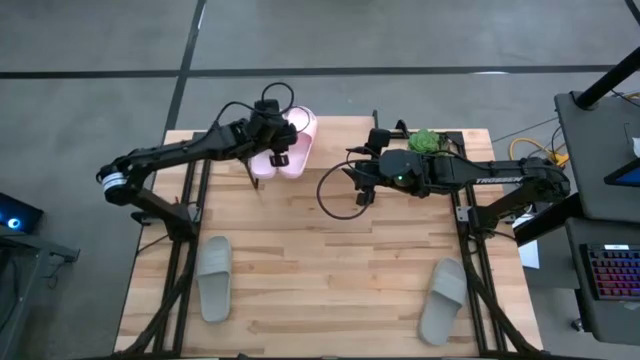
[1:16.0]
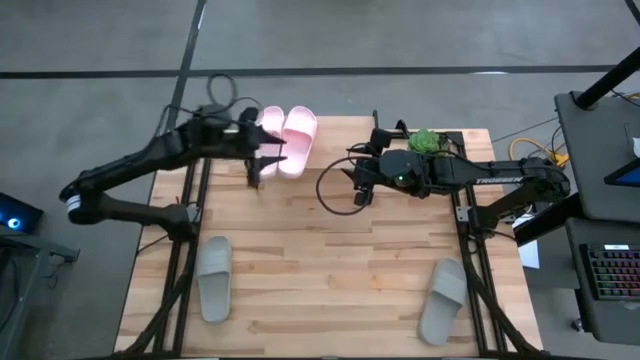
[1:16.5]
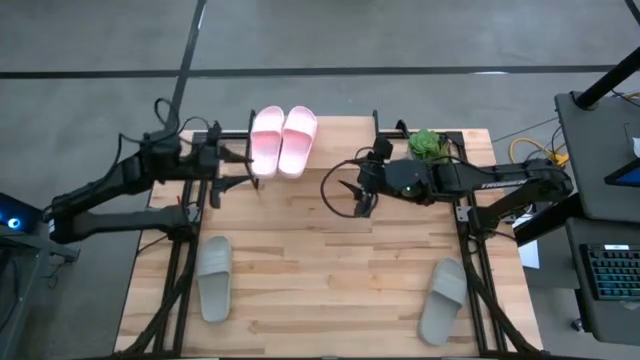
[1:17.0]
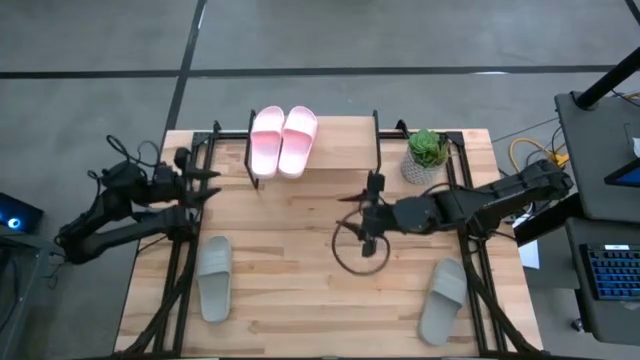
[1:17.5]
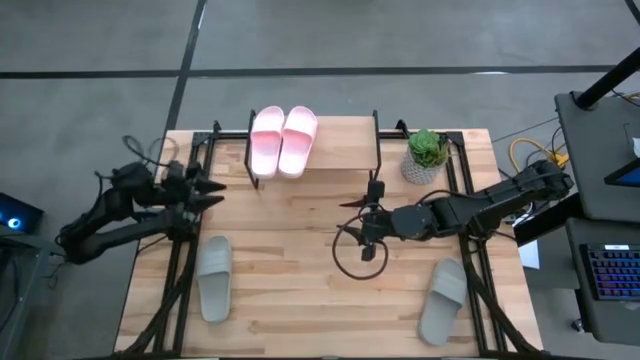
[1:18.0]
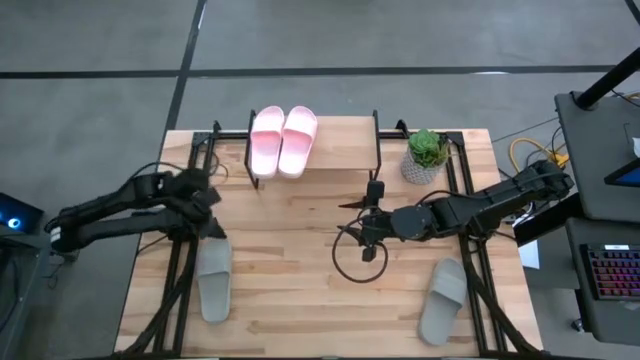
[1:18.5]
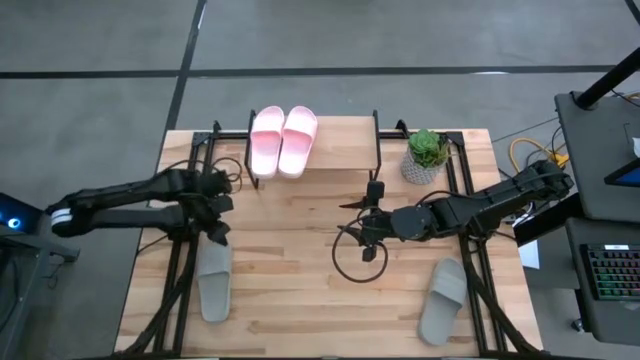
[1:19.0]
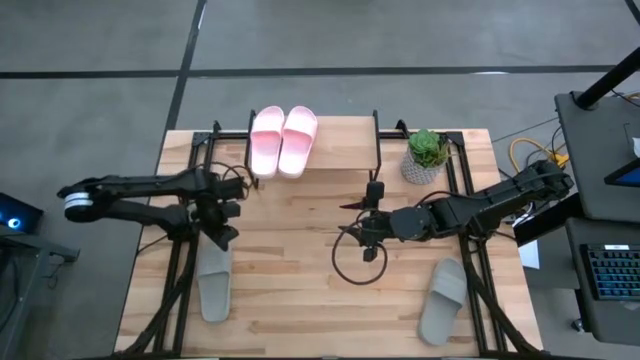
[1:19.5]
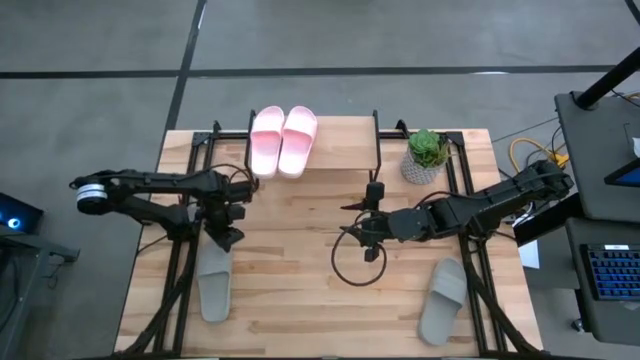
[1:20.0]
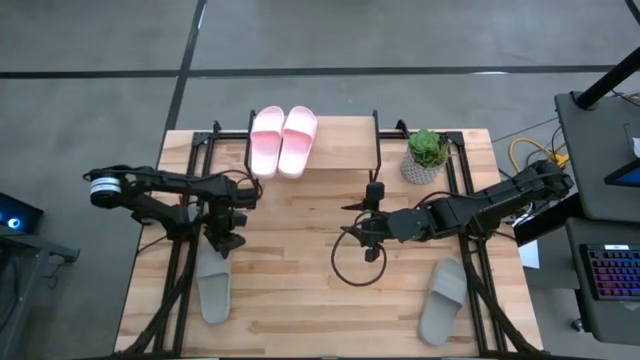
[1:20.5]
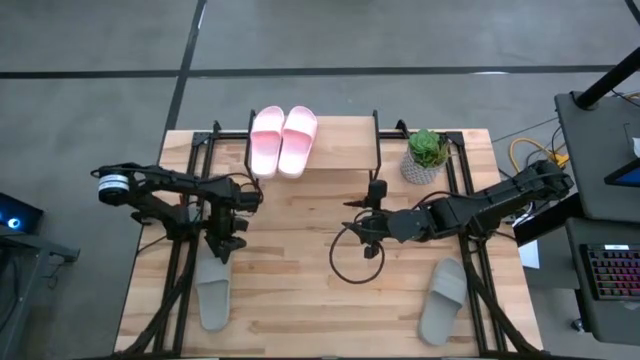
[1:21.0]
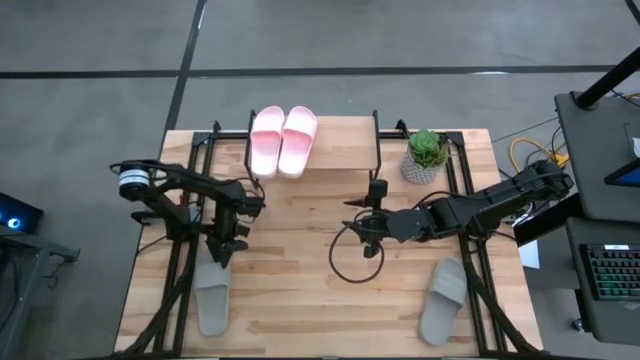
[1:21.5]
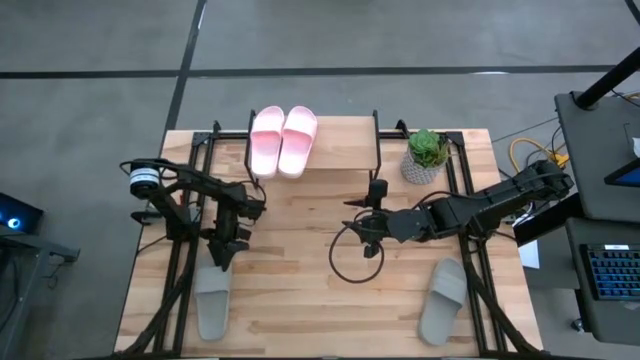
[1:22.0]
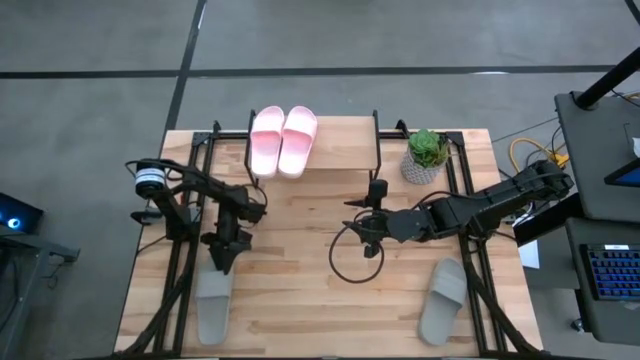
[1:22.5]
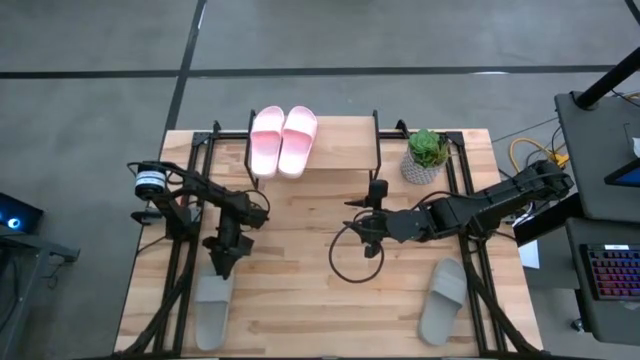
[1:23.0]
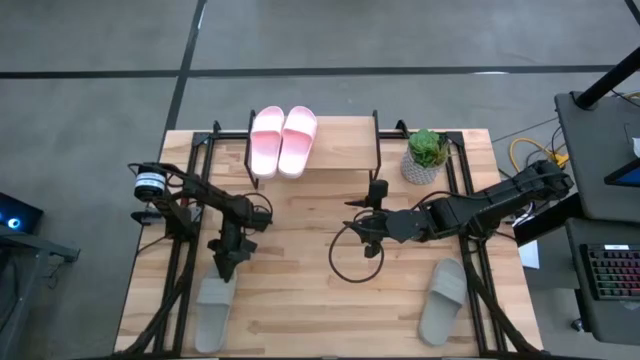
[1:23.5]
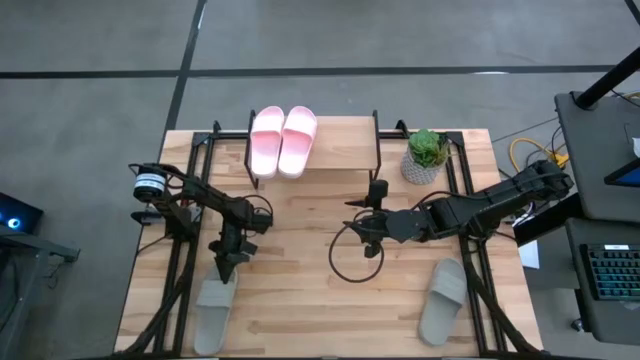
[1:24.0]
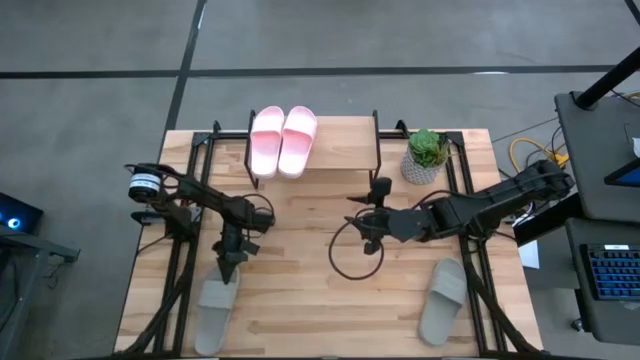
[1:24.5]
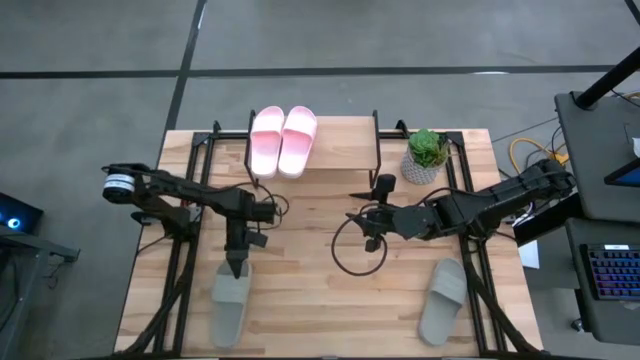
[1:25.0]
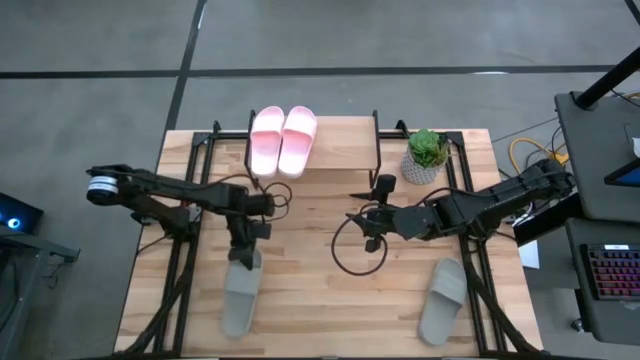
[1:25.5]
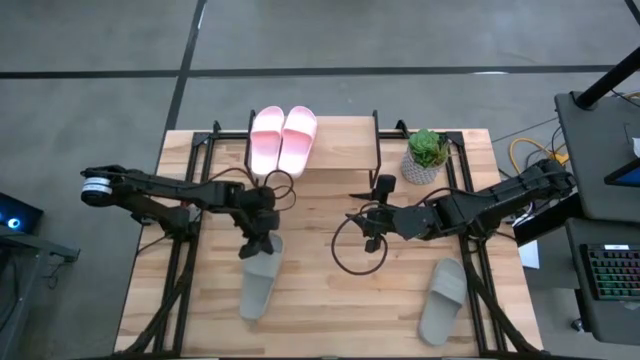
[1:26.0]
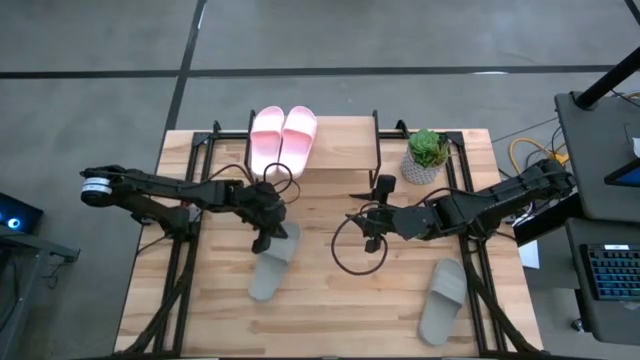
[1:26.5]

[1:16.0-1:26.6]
Task: Pick and place slides into the shelf
Put the left gray slipper on the shelf

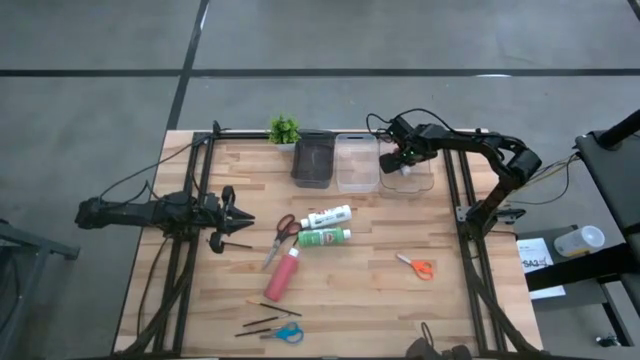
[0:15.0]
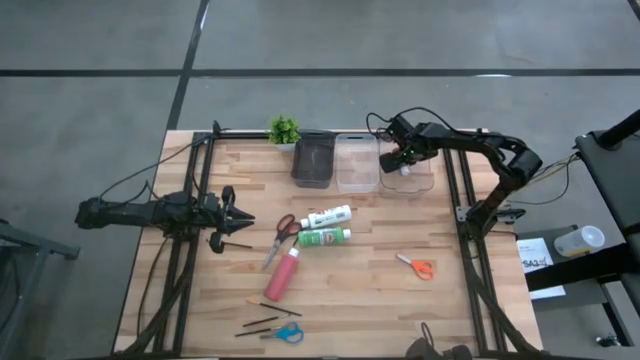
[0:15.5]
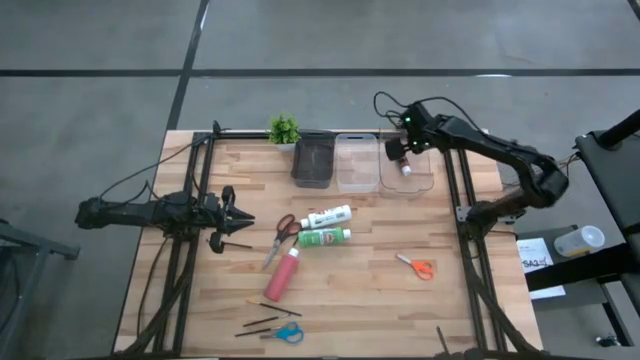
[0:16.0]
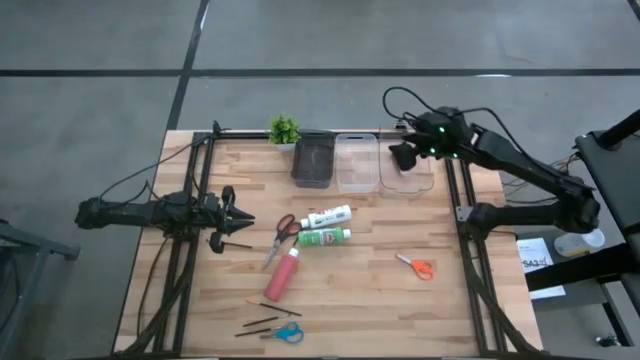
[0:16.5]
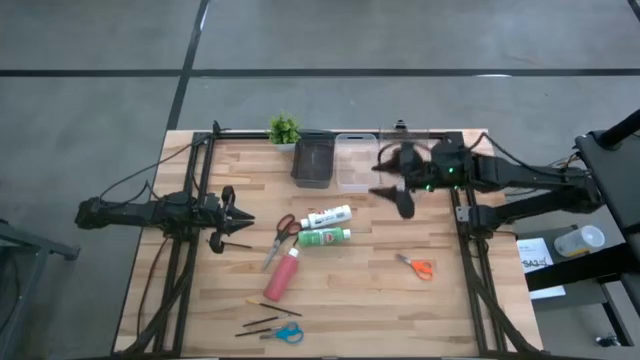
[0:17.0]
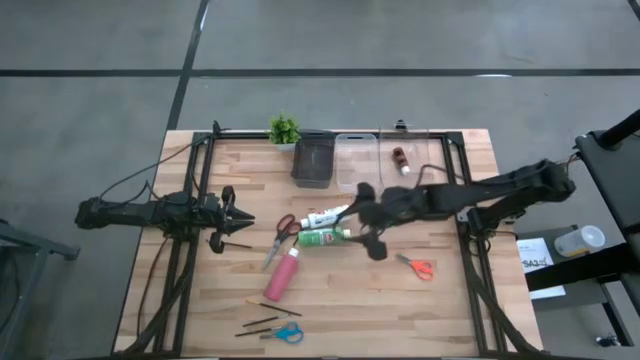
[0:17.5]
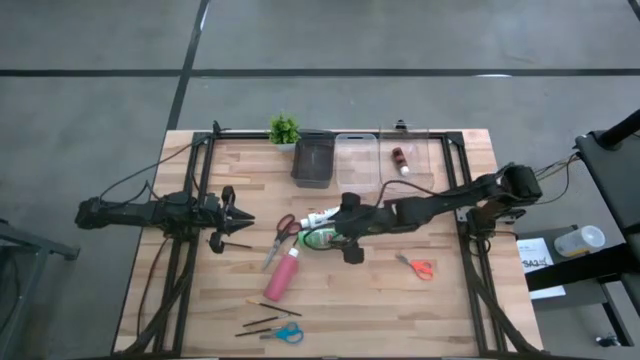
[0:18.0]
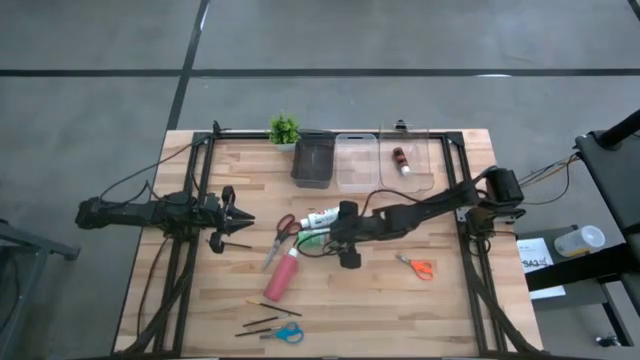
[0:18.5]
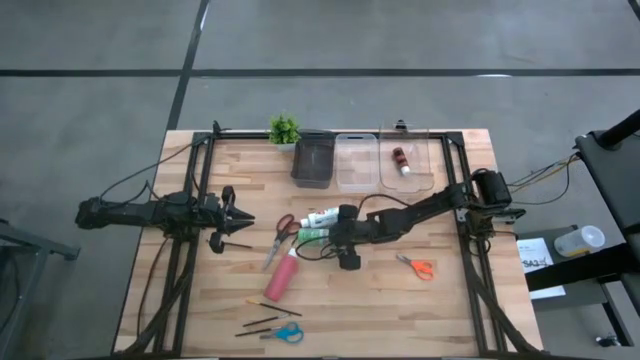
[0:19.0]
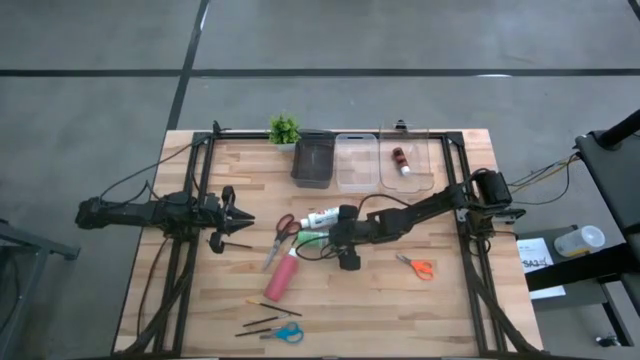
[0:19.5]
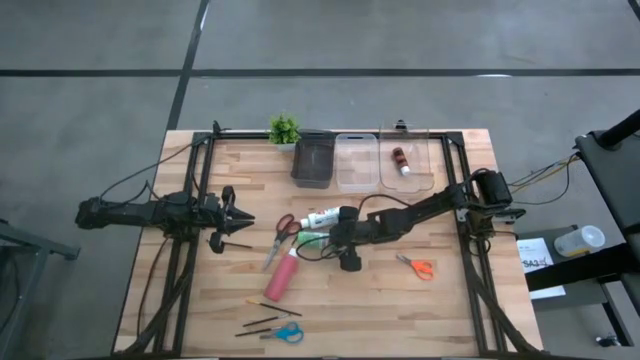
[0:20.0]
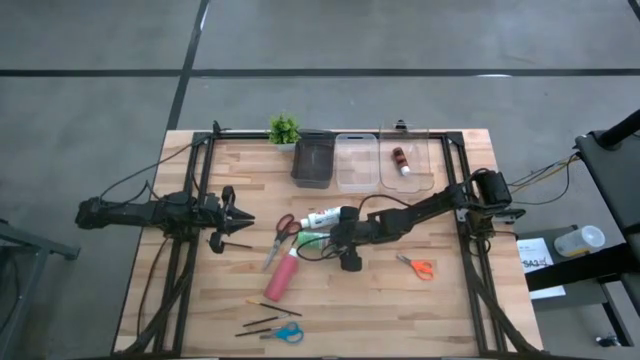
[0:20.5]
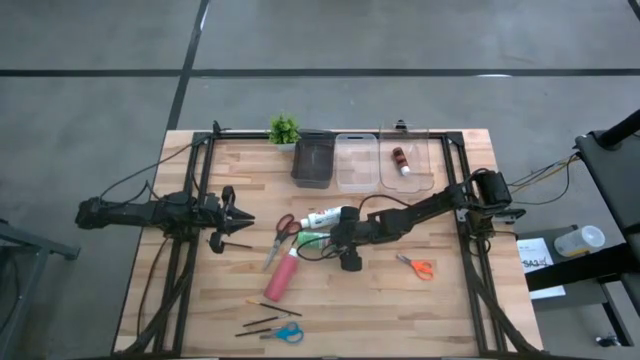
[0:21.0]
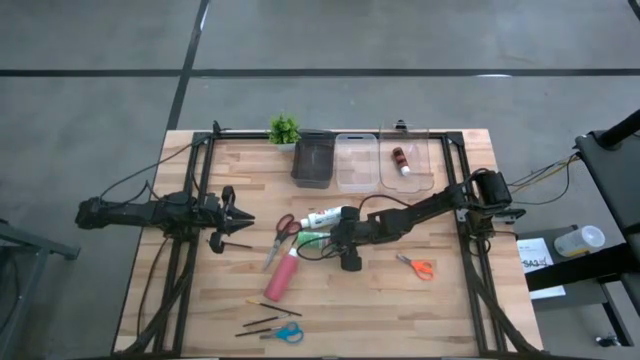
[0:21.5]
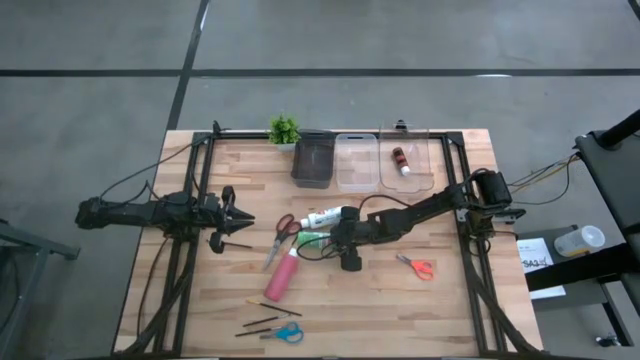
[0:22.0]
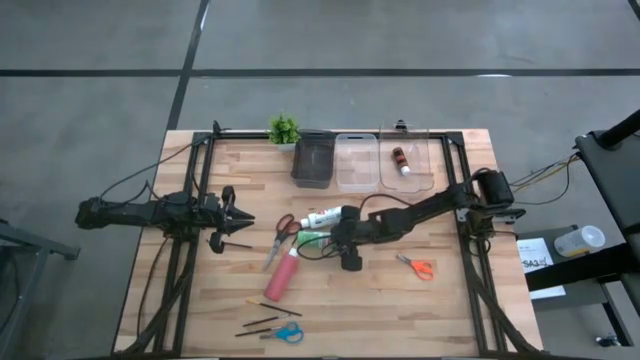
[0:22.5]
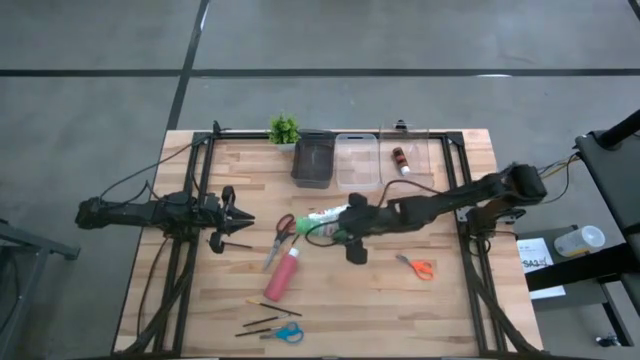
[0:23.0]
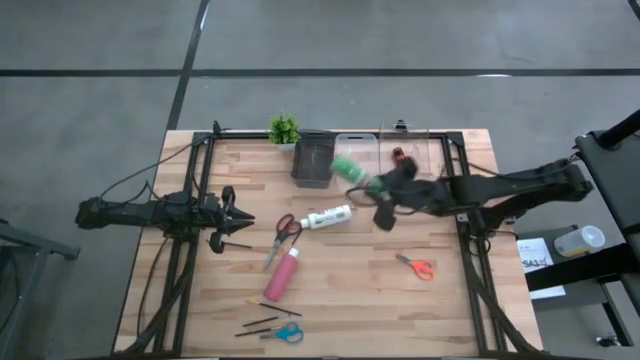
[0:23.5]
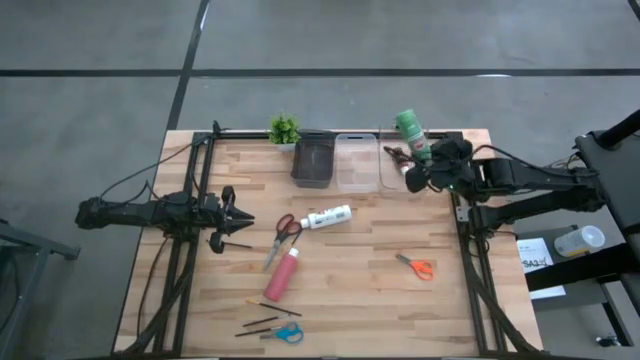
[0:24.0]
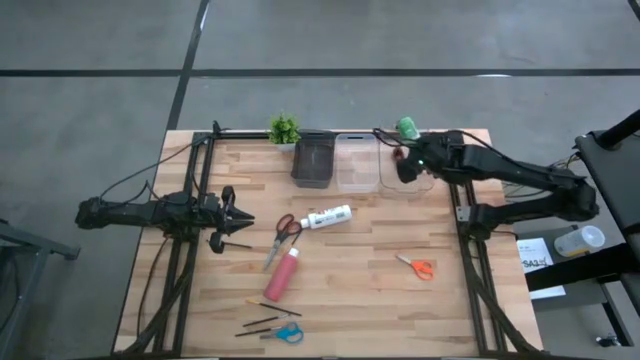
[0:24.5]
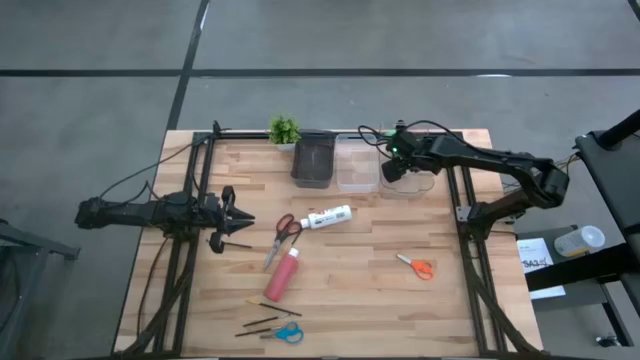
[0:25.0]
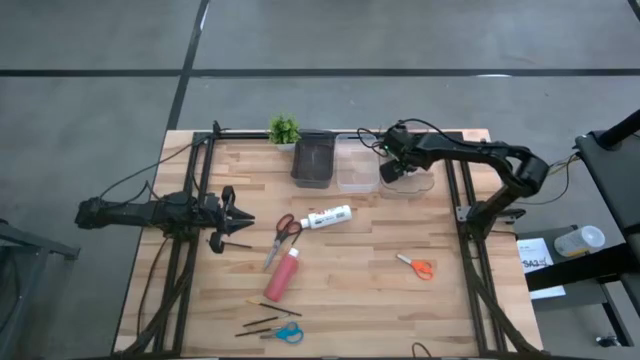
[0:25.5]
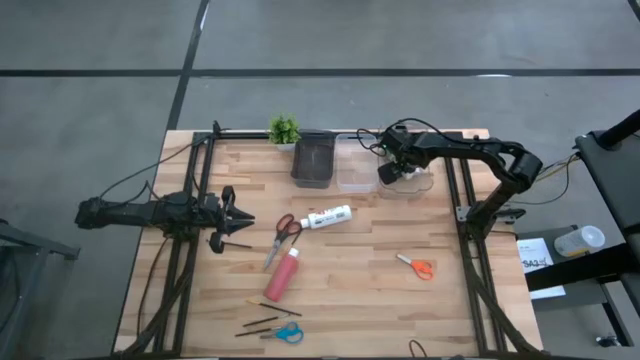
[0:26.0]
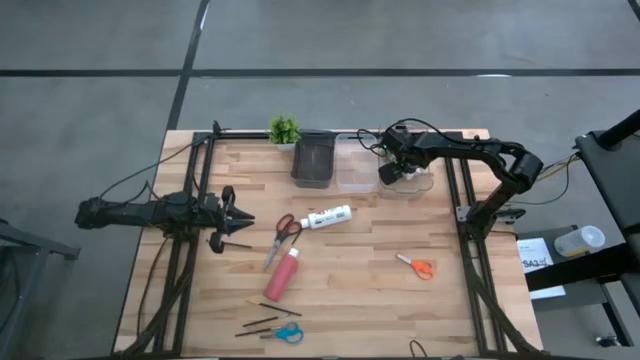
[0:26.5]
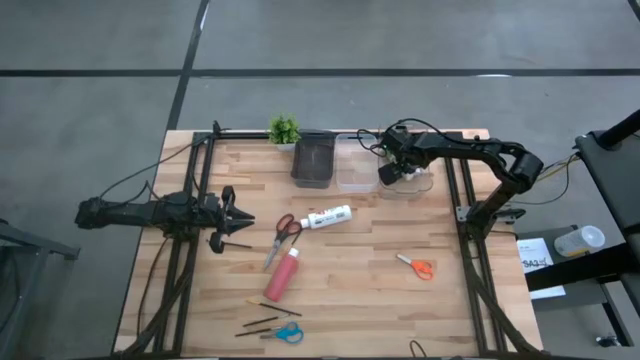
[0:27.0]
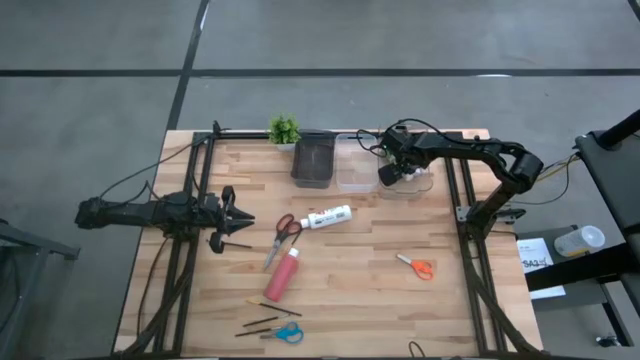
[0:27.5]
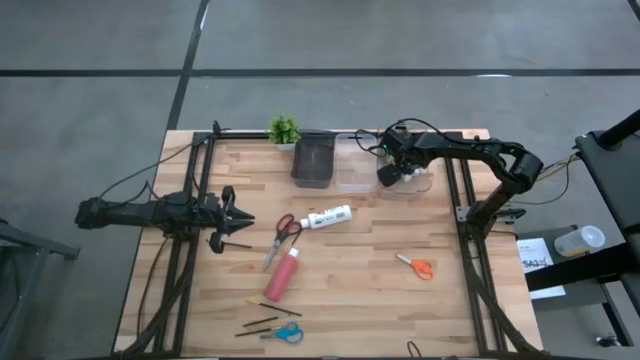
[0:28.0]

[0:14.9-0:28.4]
Task: Pick & Place Paint Supplies
Put the green paint bottle into the transparent bin
